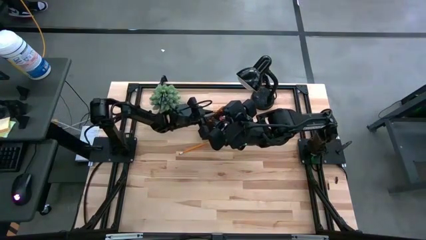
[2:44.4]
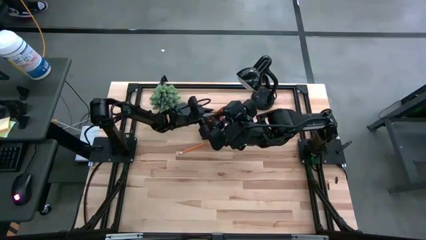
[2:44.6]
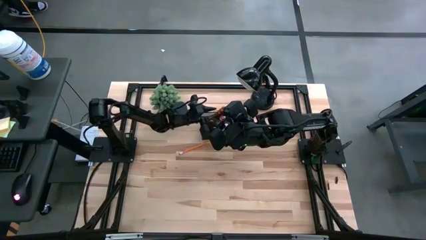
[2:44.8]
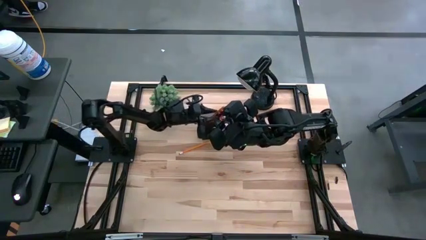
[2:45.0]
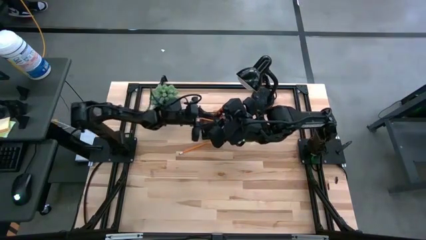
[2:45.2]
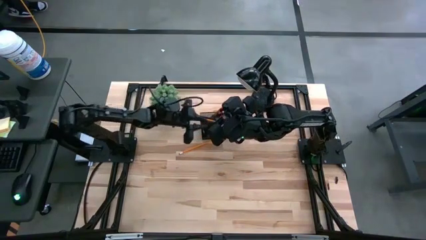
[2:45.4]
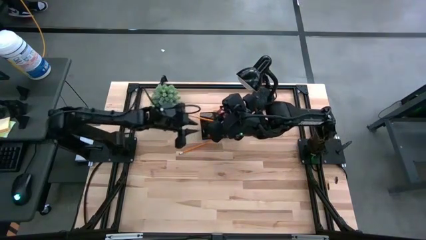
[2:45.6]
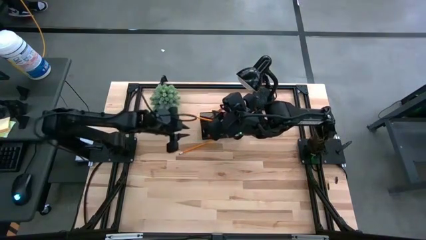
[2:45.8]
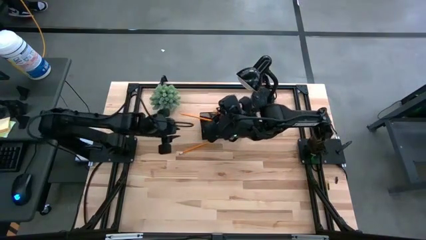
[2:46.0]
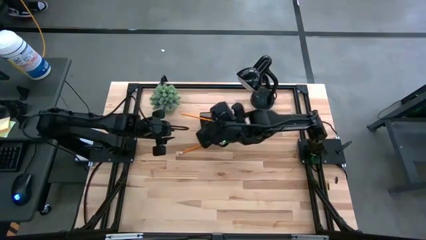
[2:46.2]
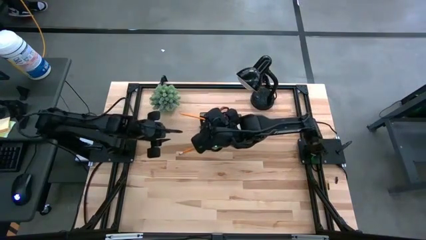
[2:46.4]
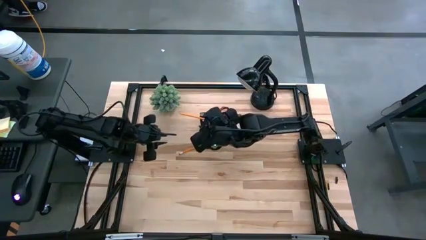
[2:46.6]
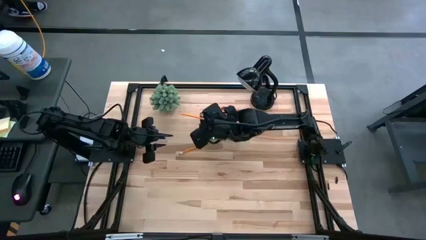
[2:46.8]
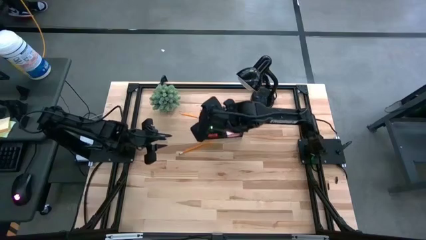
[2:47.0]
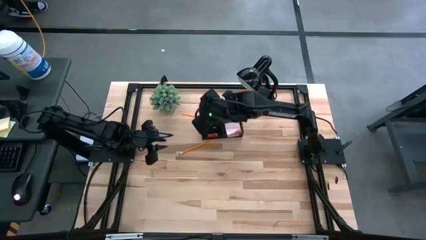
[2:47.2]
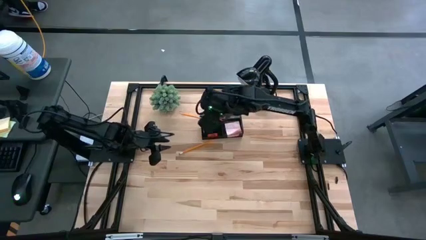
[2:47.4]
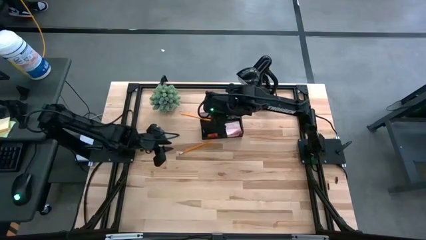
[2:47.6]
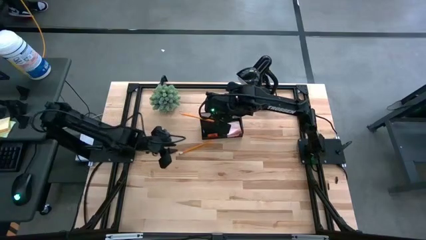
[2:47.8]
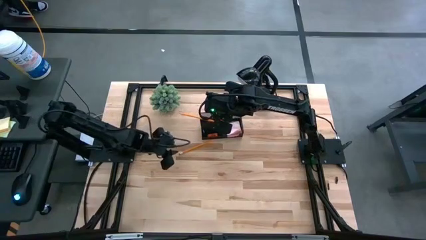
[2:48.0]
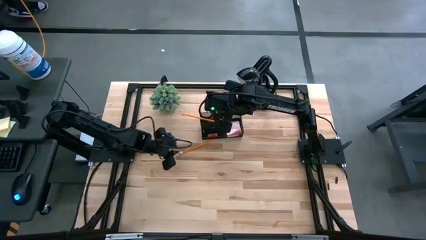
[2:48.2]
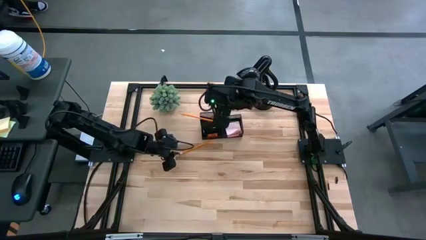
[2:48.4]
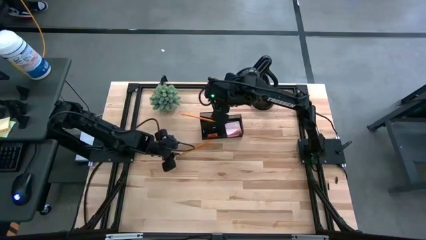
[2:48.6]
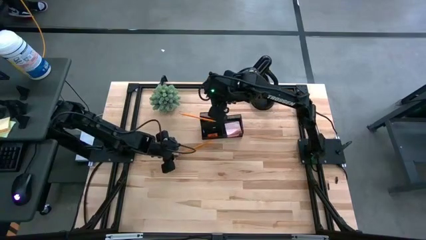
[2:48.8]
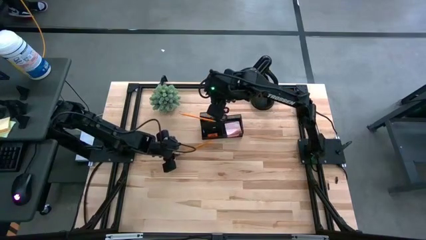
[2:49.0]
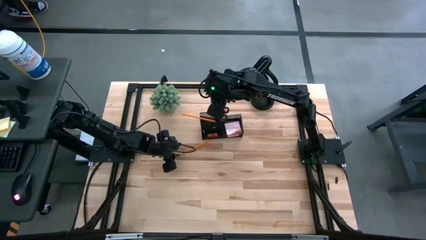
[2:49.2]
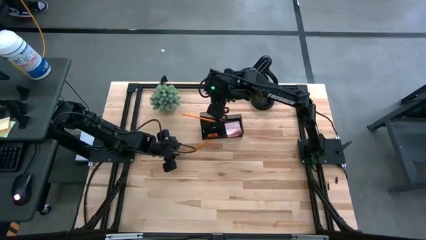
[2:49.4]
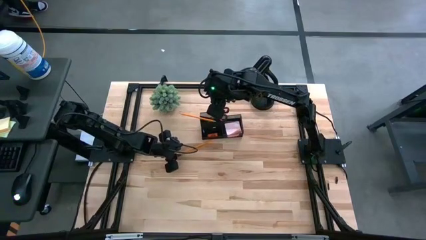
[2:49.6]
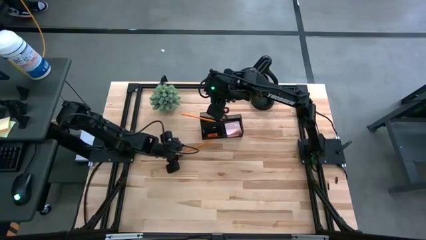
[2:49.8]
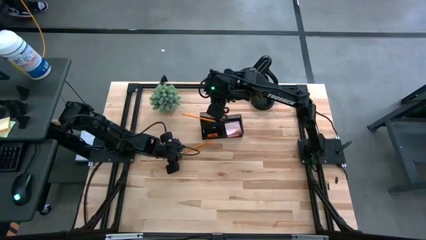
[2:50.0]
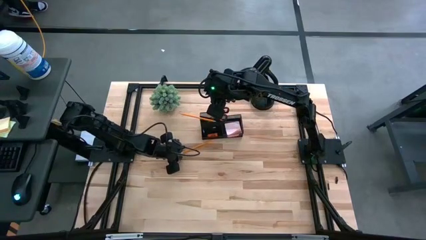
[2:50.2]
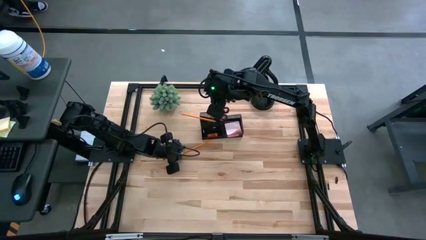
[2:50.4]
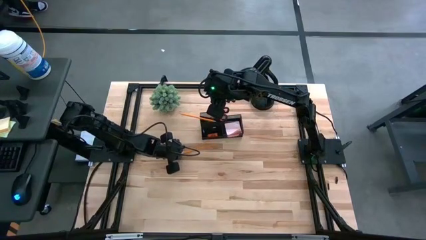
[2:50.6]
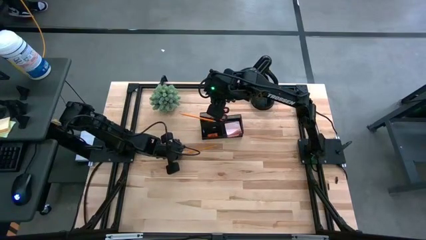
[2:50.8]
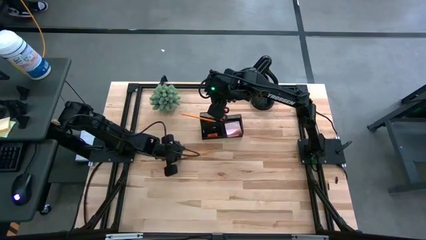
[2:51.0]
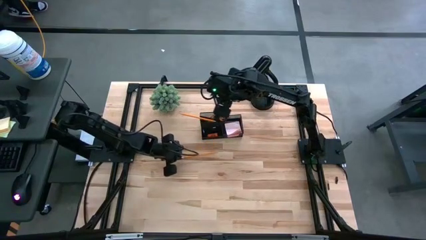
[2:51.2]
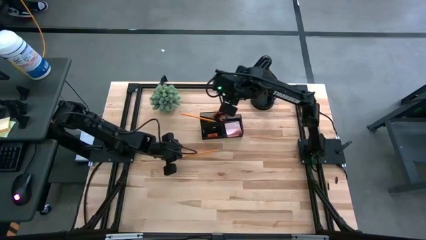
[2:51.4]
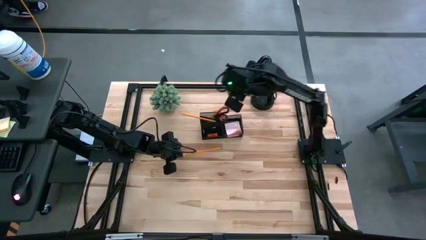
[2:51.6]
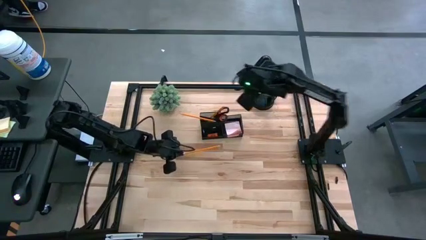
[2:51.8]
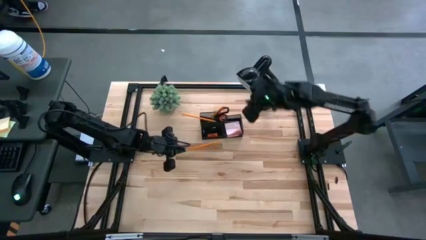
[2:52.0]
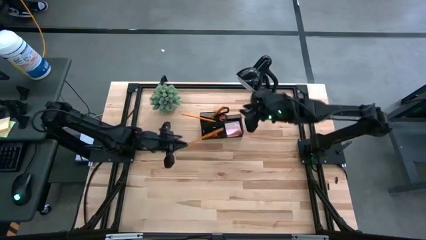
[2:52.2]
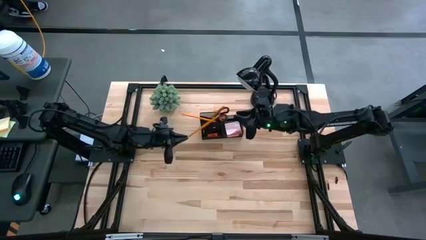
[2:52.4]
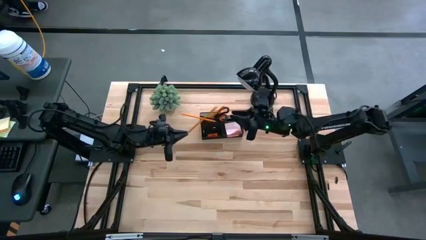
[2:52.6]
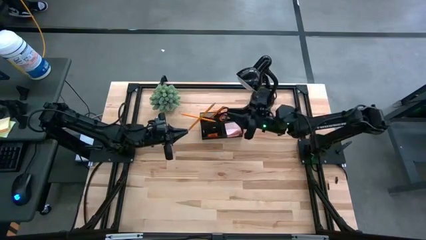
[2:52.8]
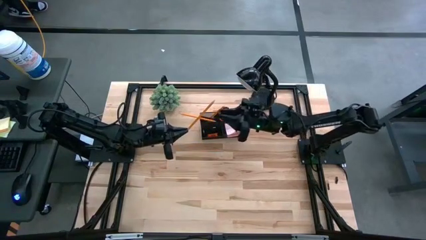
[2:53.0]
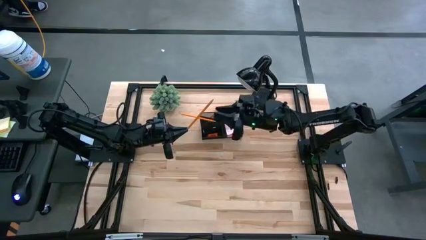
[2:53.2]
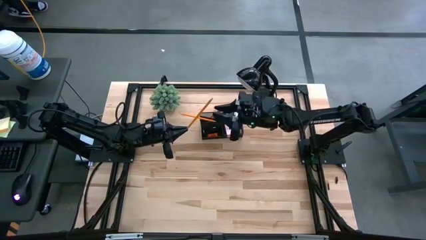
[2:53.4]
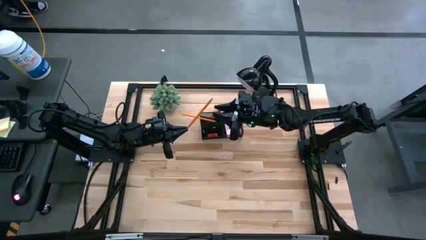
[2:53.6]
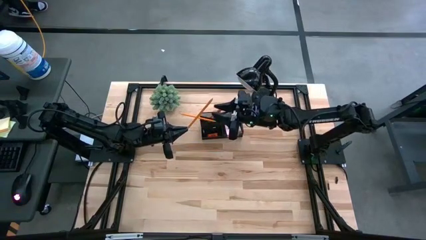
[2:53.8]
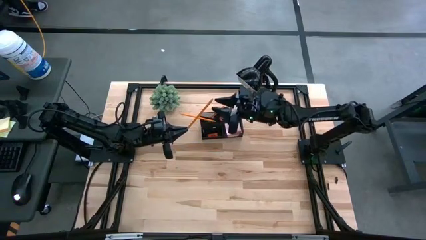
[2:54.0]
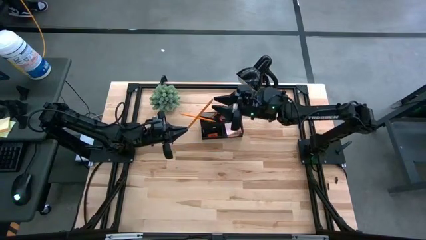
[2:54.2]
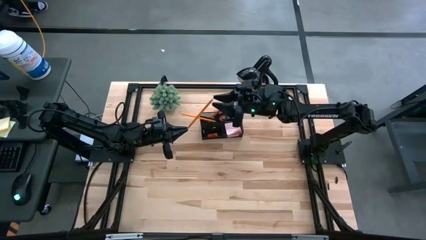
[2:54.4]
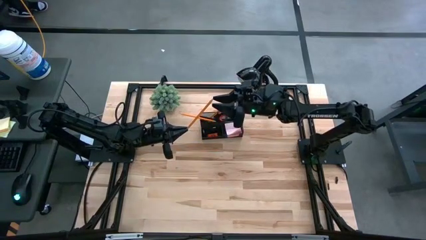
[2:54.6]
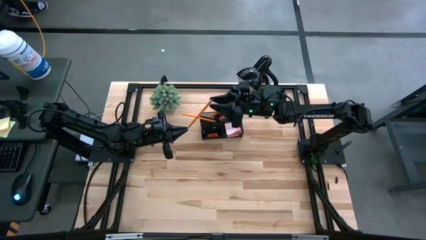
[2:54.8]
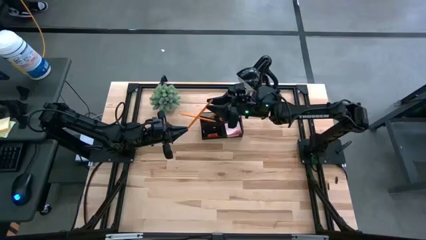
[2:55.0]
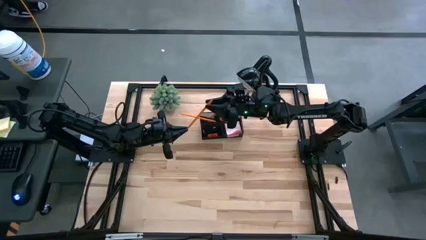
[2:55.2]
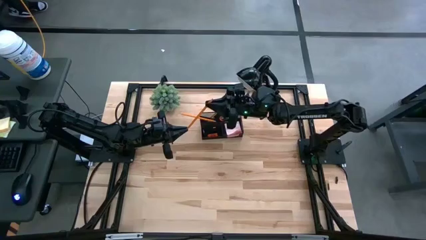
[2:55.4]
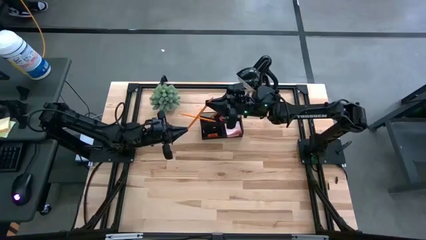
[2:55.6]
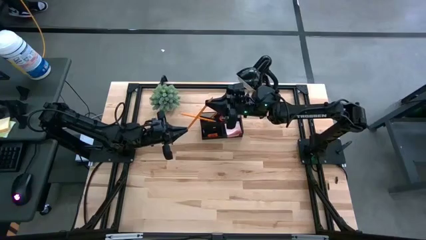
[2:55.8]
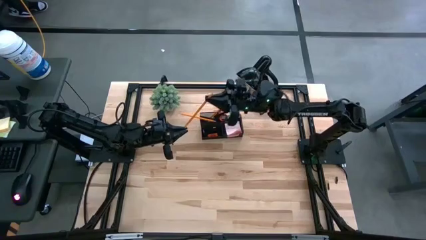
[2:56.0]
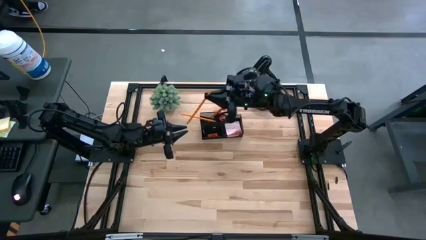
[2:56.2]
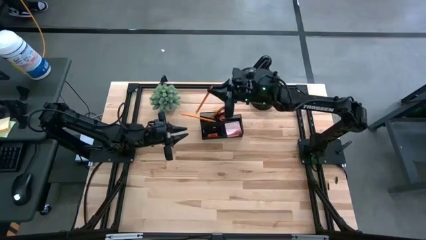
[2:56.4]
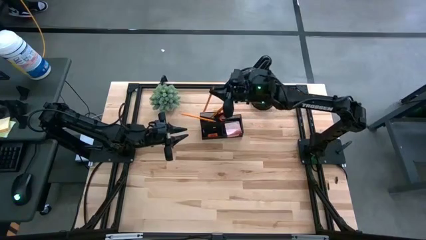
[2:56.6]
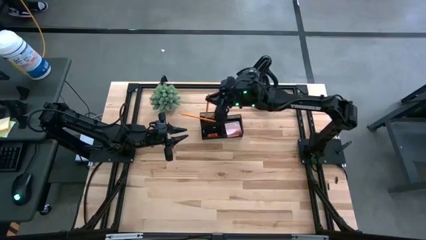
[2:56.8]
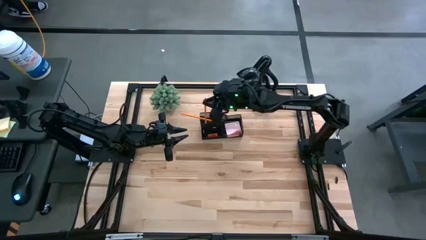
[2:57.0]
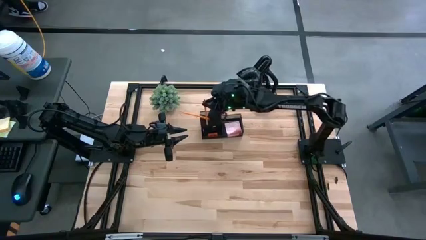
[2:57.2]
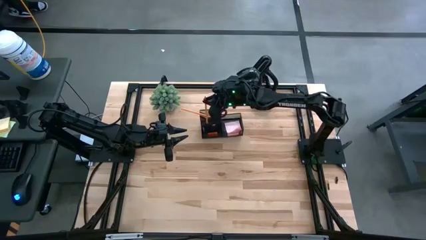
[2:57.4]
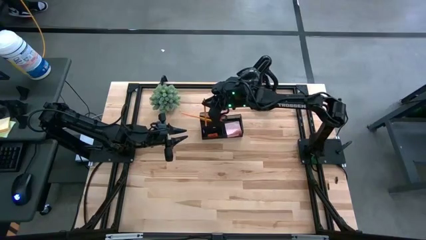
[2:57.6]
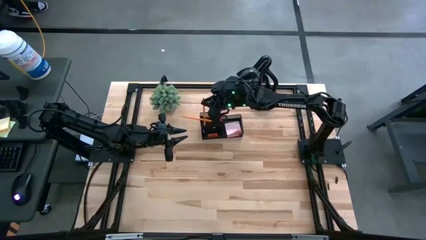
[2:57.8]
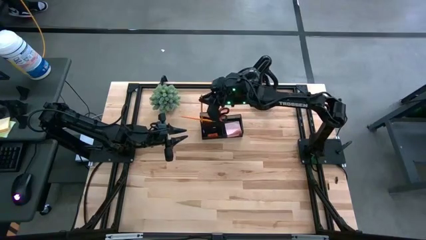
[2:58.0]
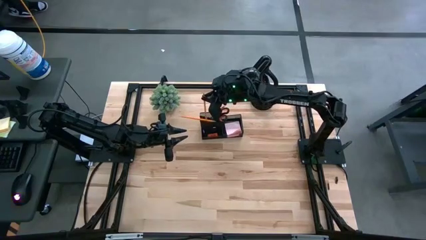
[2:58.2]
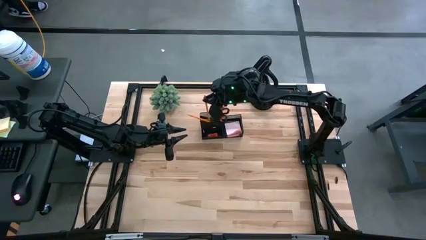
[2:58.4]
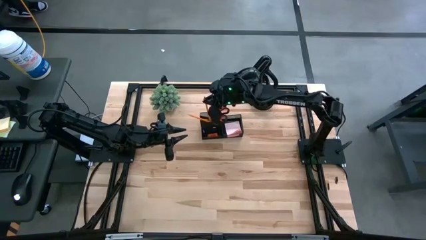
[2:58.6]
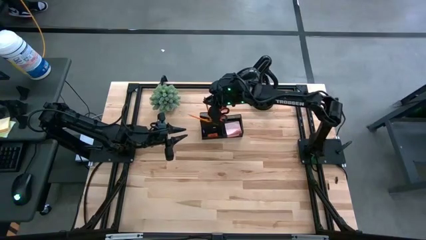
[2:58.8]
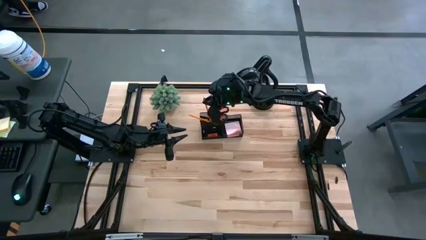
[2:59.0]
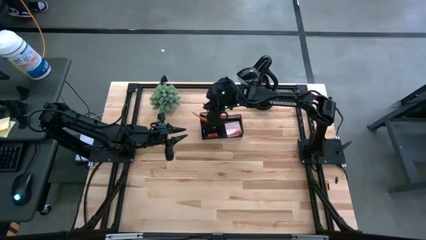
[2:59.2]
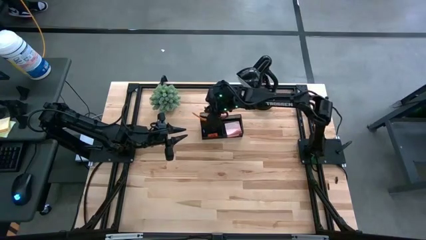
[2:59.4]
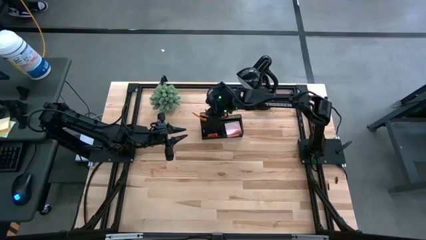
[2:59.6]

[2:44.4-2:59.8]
Task: Pick and place office supplies into organizer
Put the pencil into the desk organizer
